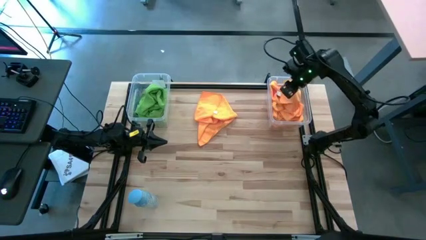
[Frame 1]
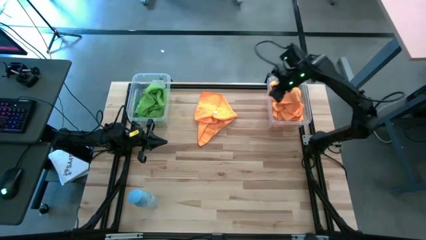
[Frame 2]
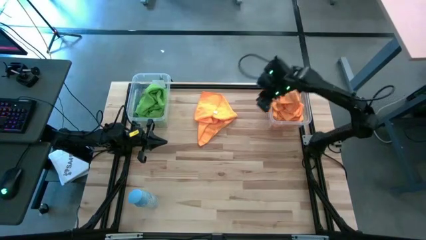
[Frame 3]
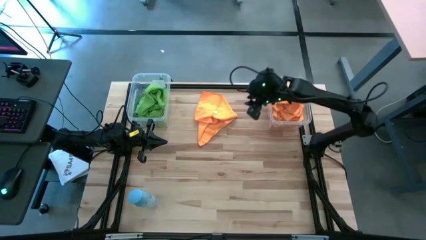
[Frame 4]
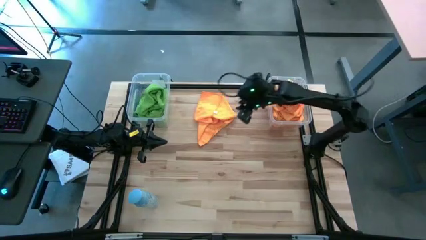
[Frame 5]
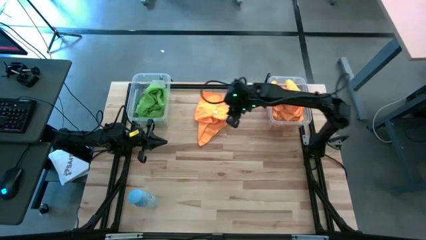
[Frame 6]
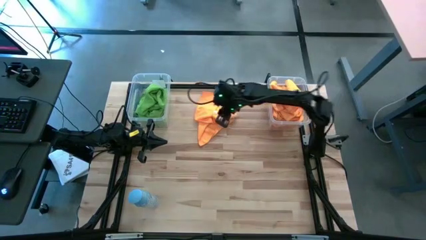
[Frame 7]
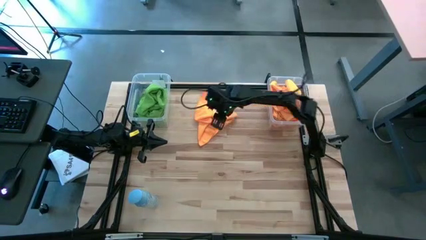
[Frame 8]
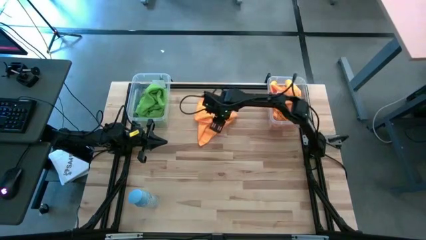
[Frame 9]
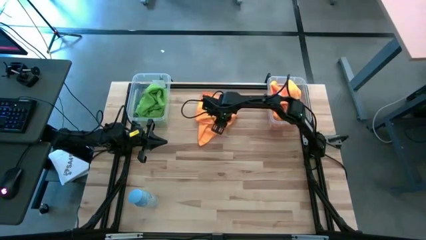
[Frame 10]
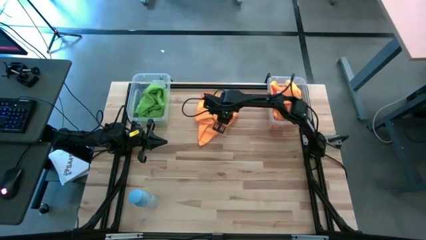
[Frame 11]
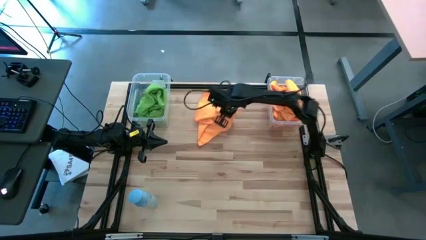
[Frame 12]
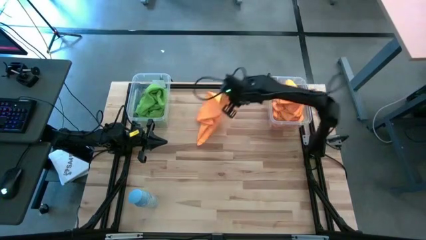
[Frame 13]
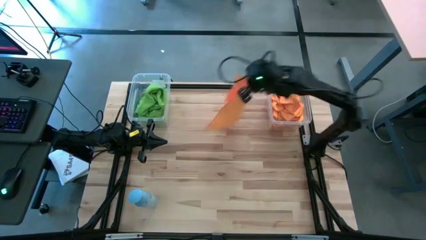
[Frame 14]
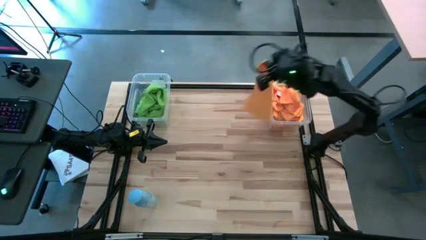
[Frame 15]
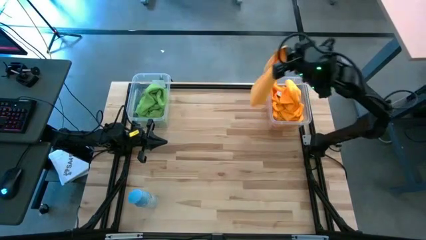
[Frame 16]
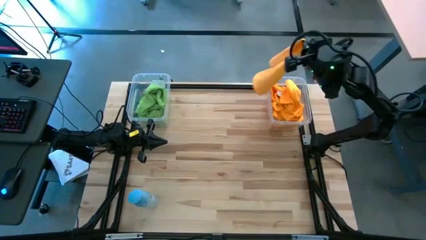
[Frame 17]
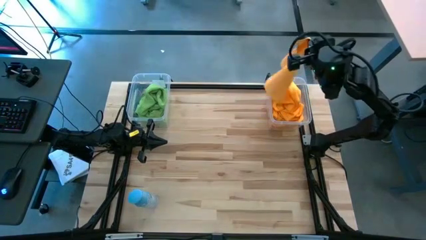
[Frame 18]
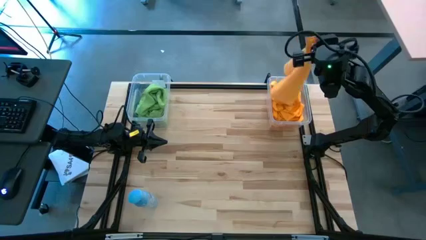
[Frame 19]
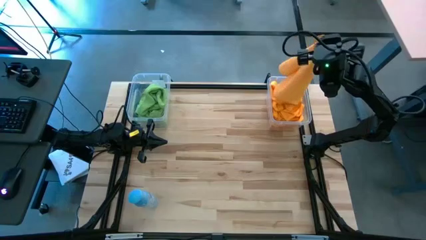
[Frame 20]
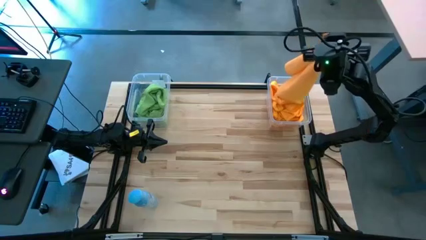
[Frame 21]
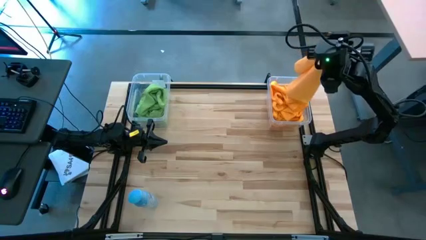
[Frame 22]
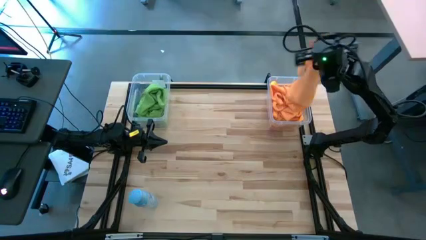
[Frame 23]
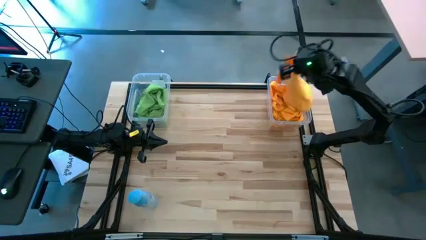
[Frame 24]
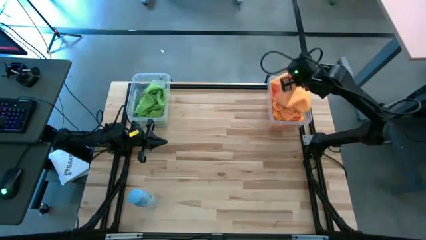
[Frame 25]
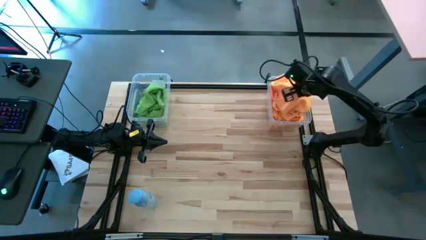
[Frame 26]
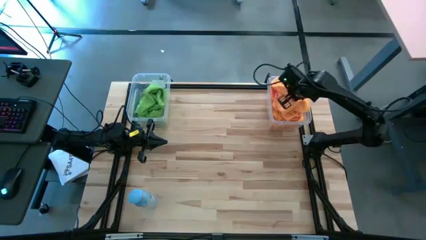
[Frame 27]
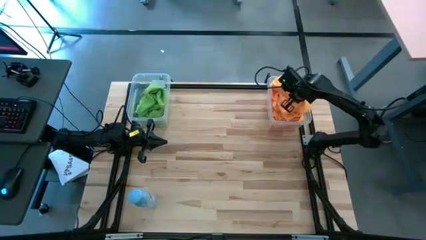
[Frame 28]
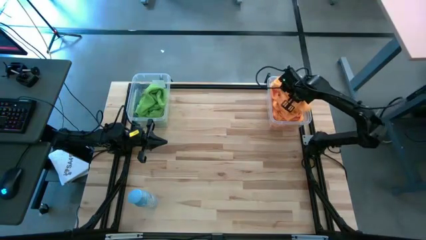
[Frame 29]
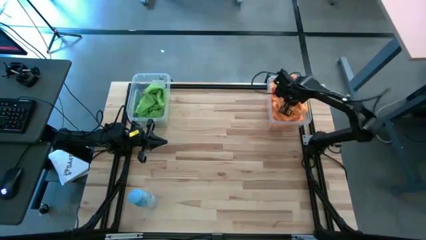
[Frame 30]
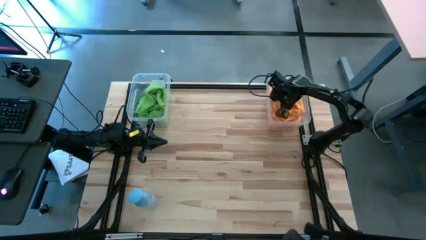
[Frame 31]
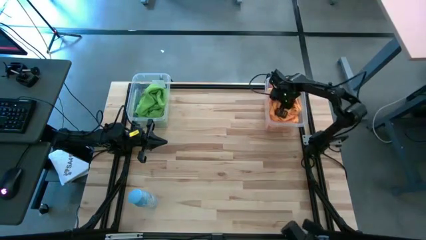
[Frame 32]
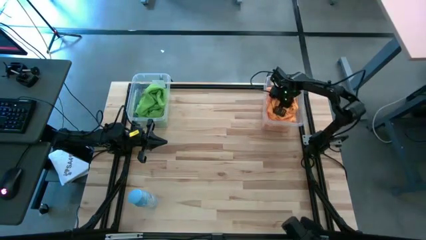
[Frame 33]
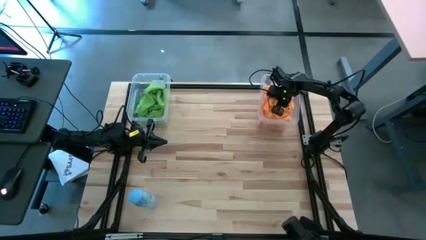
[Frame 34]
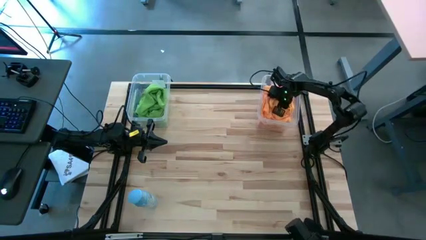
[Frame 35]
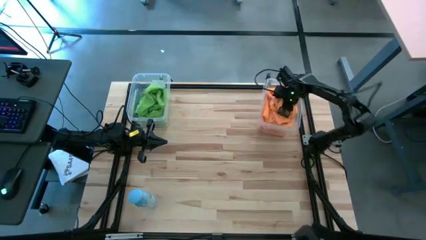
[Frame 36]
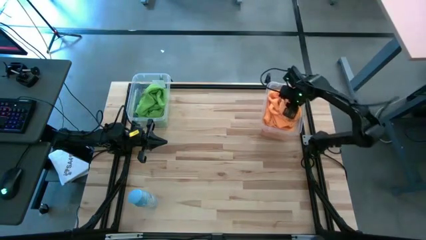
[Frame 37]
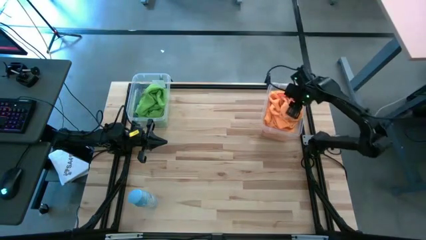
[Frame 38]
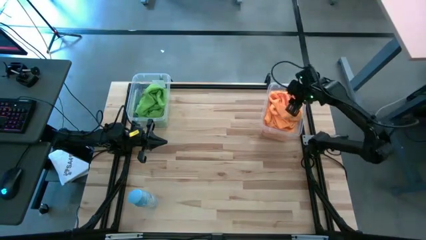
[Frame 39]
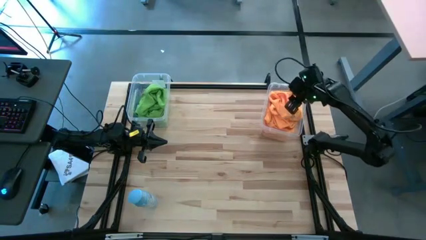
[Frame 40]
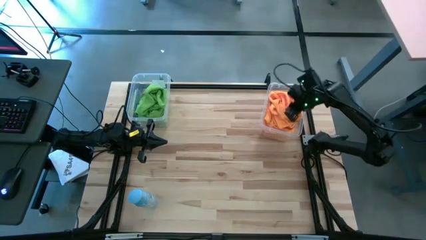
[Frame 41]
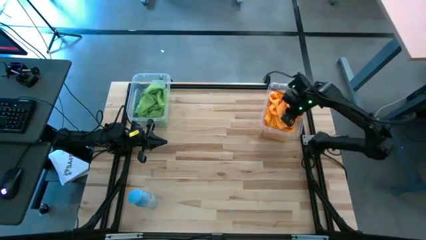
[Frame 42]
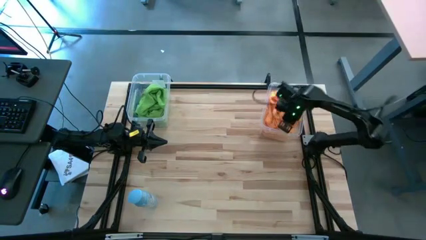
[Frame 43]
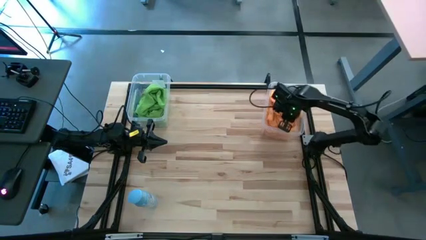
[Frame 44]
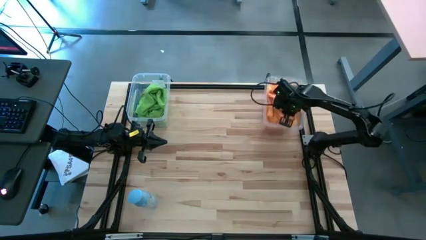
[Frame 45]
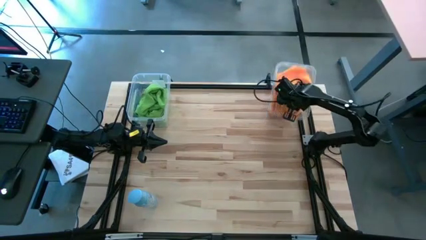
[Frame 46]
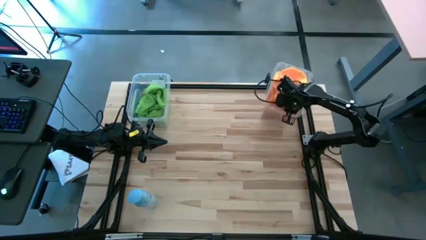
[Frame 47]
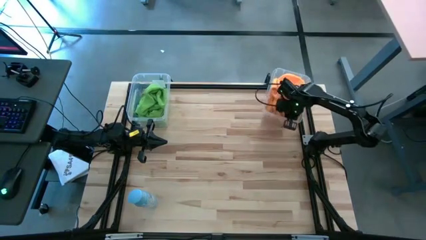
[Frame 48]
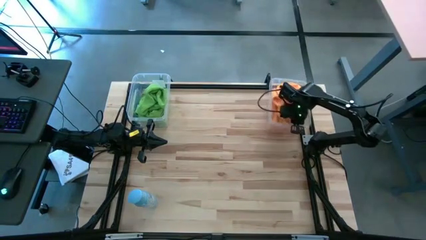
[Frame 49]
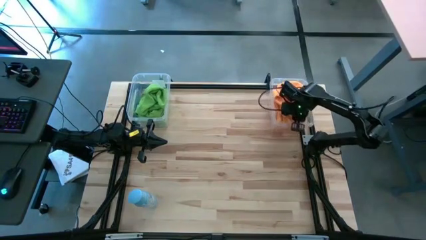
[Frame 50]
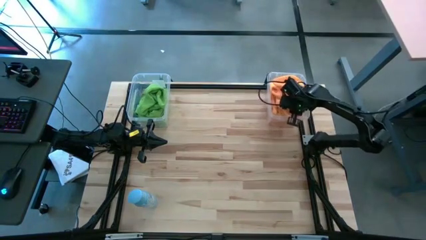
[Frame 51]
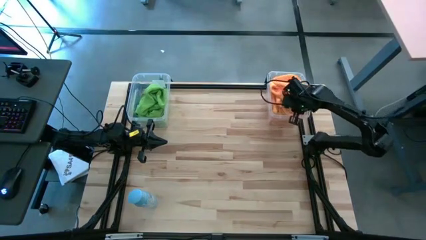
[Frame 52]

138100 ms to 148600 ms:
Task: Sort microfiber towel by color & place in baskets
Put the orange microfiber towel into the right transparent bin

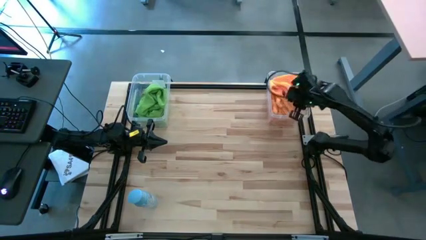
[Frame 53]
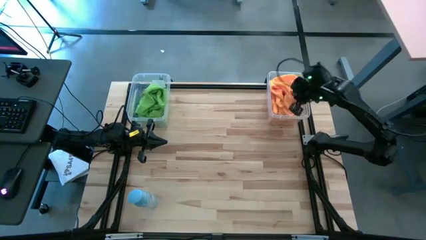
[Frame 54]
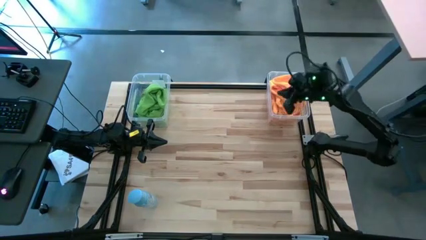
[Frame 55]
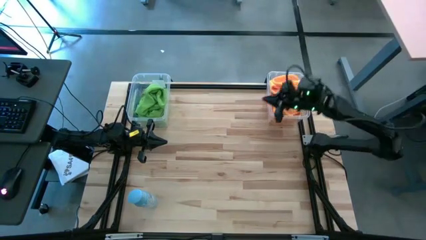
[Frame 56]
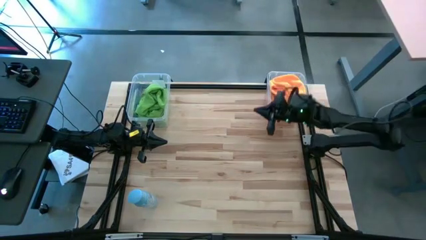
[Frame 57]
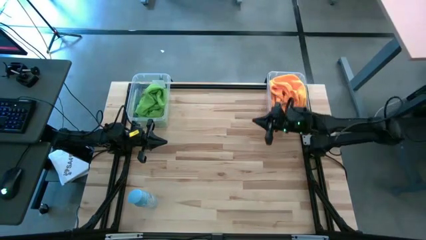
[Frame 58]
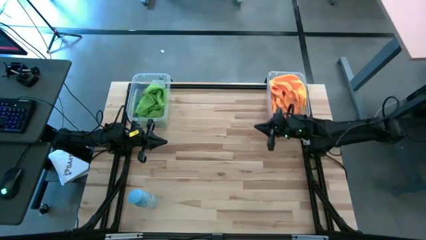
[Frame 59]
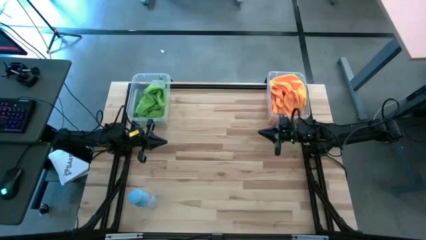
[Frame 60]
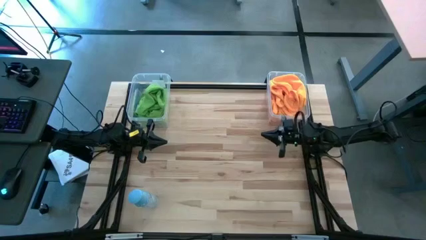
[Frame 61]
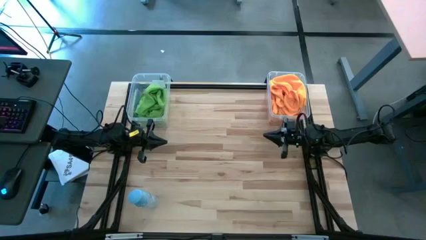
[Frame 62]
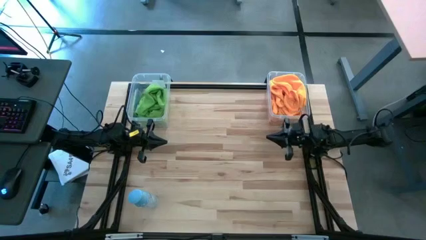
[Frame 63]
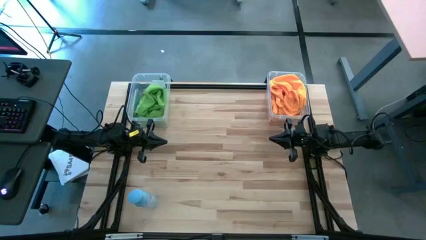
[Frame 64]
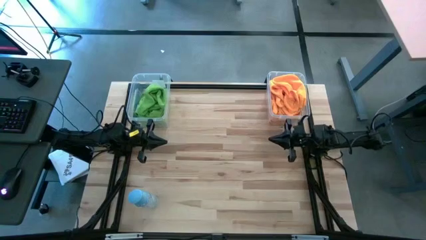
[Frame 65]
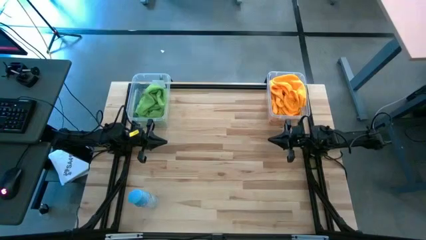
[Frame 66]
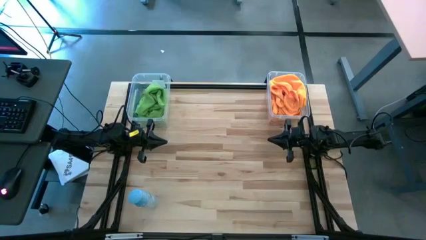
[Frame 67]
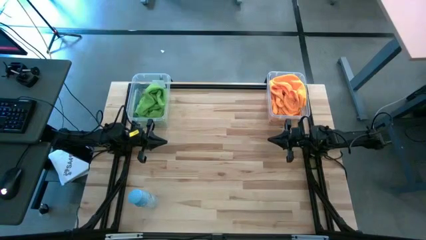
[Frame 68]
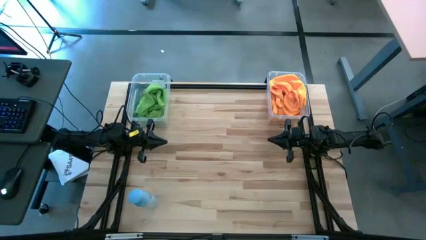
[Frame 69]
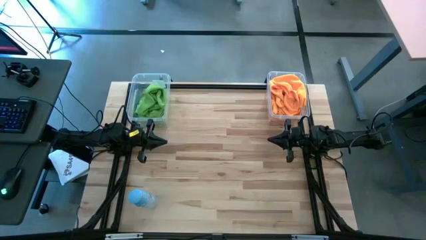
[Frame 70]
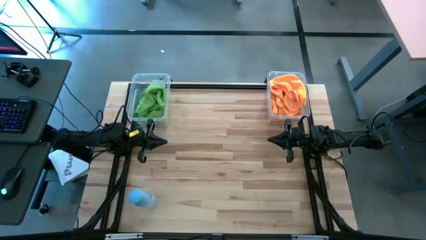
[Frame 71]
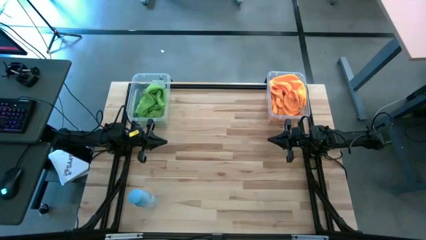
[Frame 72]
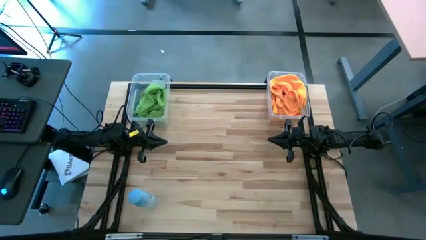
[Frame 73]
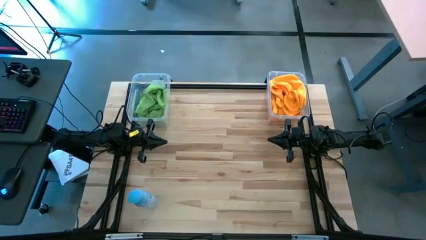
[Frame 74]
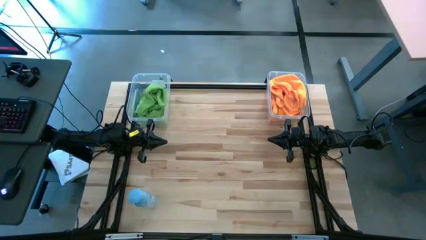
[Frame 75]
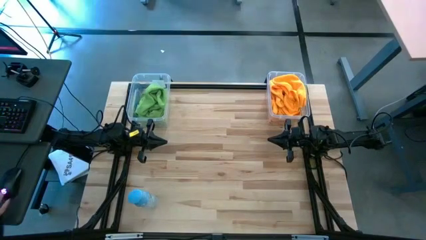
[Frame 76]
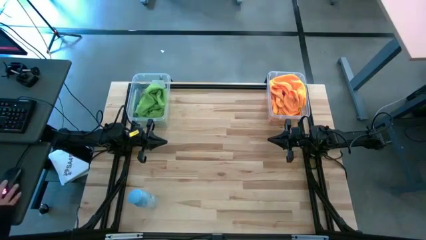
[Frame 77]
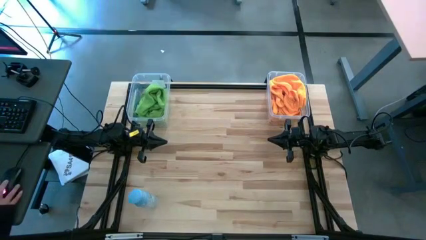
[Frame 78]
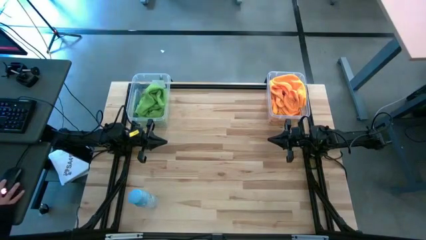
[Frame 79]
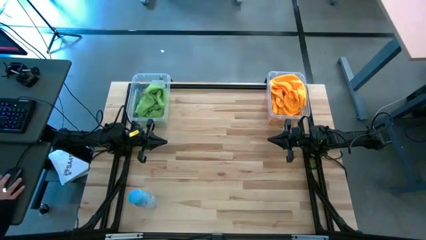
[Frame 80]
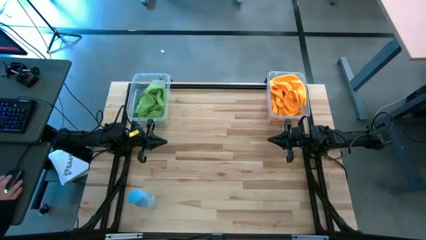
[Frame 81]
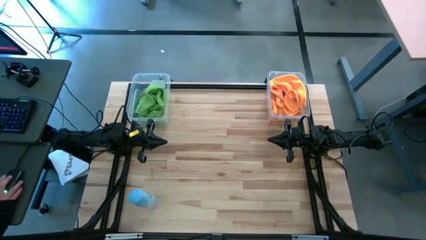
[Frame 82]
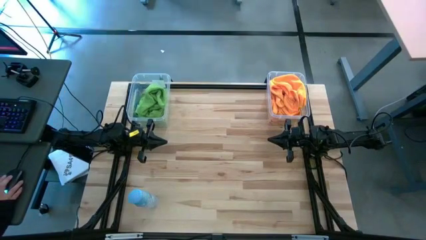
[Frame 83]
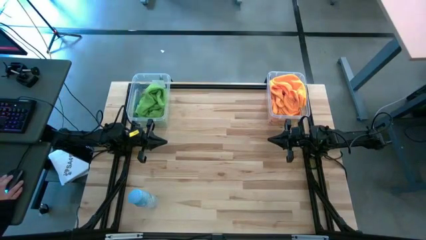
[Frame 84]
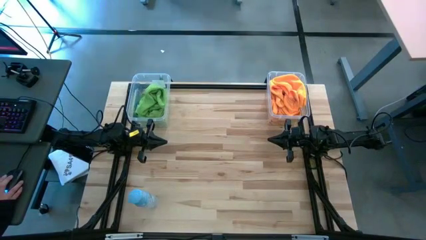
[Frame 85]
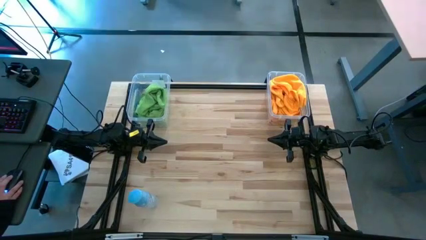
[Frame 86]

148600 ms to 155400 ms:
Return to Home Position
